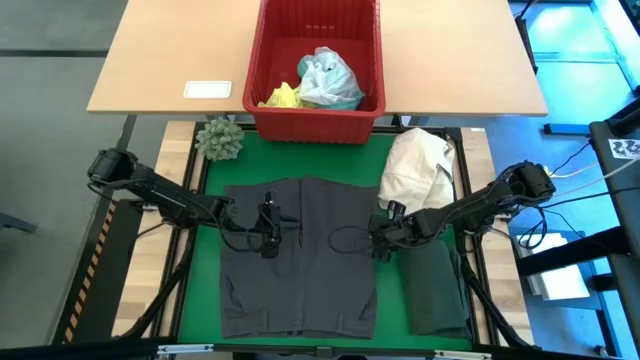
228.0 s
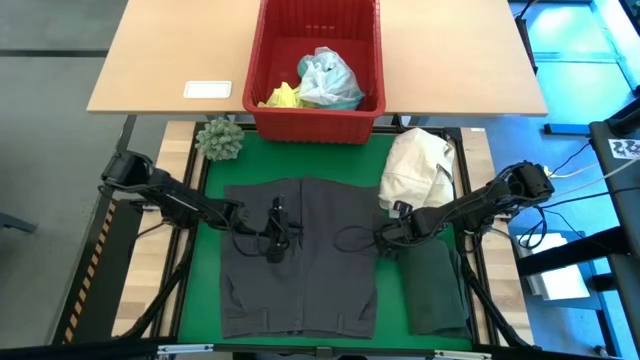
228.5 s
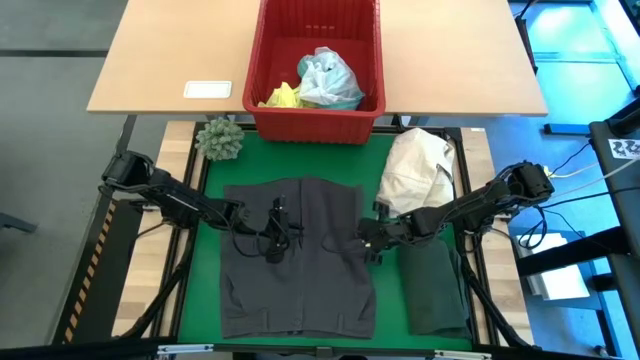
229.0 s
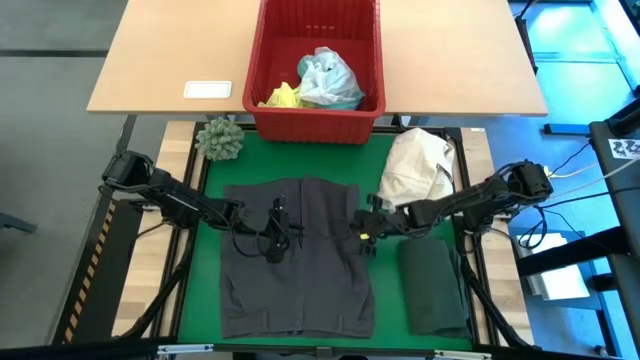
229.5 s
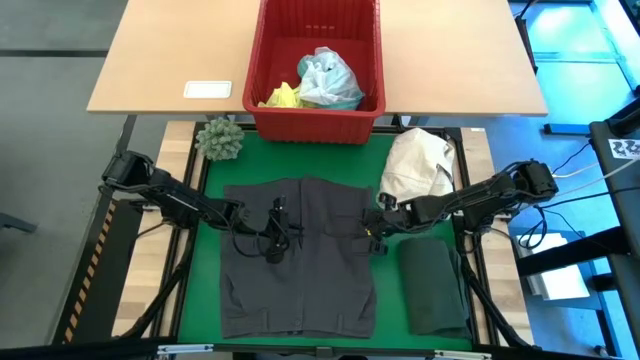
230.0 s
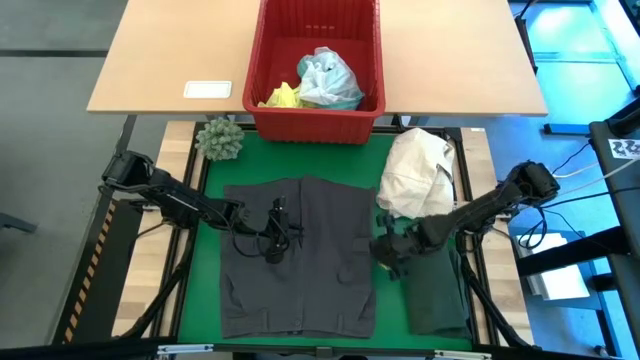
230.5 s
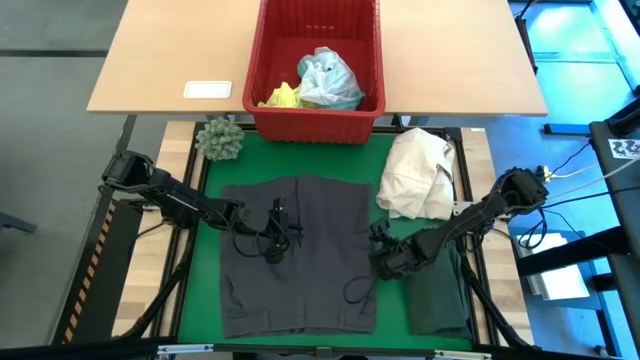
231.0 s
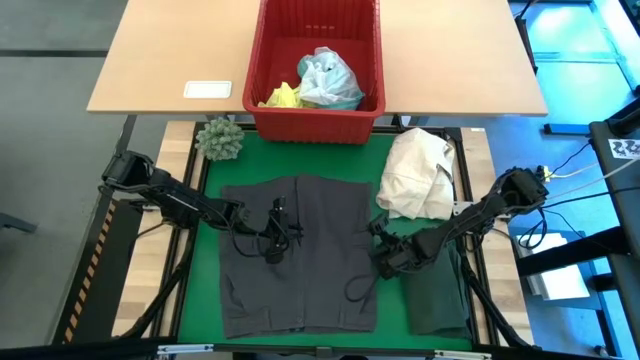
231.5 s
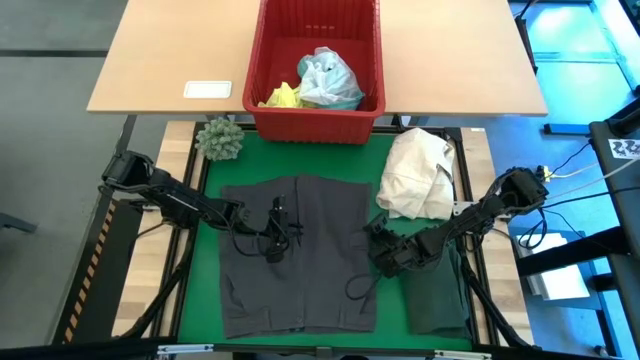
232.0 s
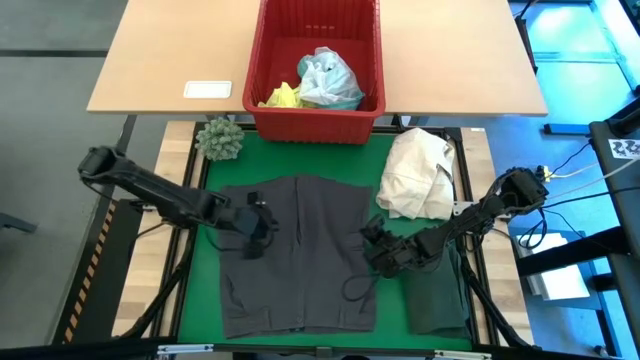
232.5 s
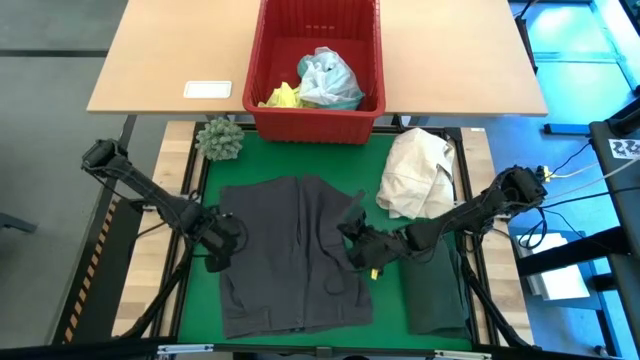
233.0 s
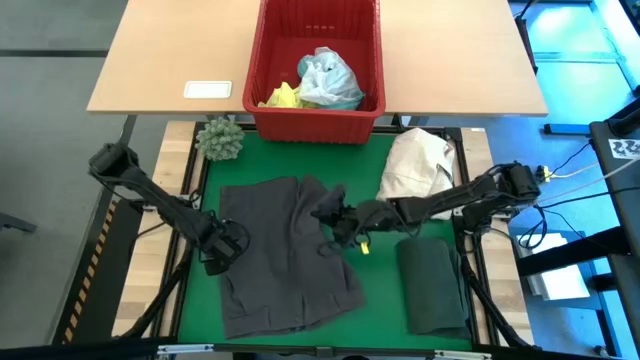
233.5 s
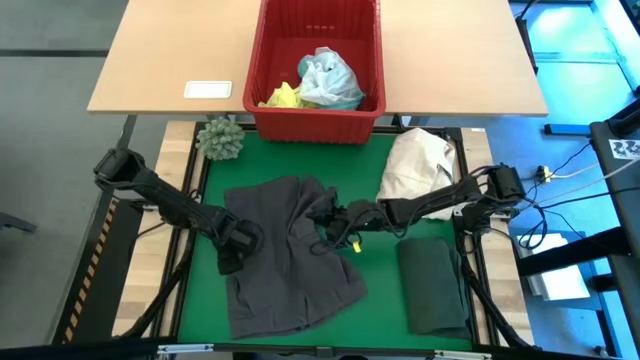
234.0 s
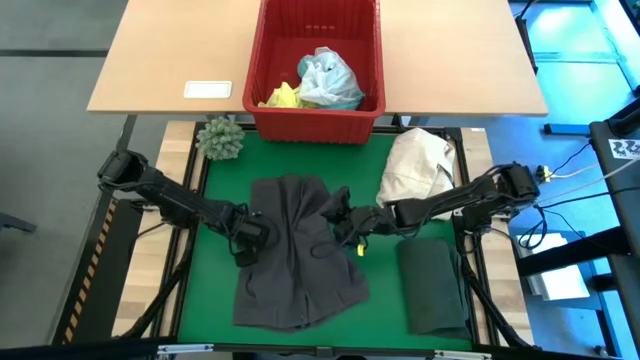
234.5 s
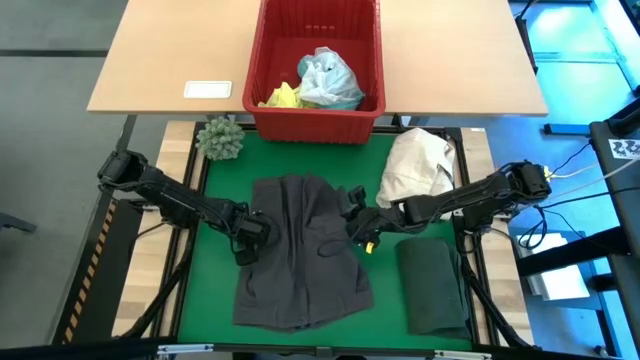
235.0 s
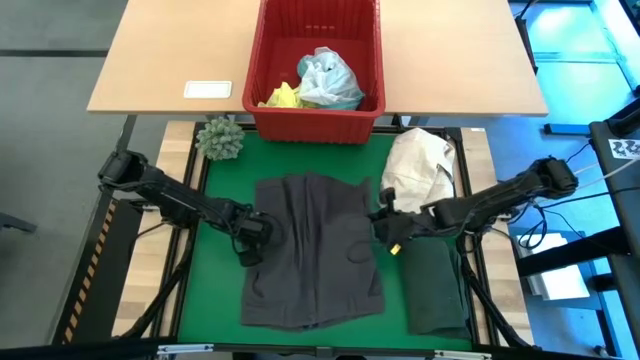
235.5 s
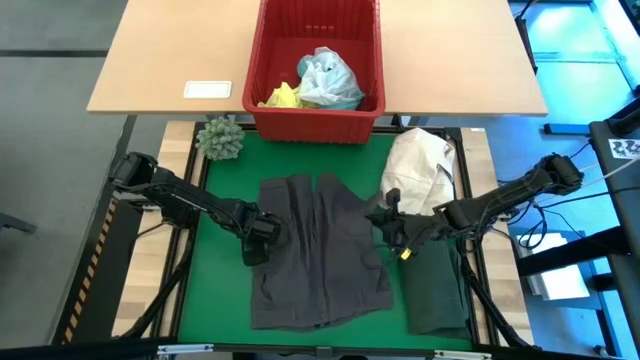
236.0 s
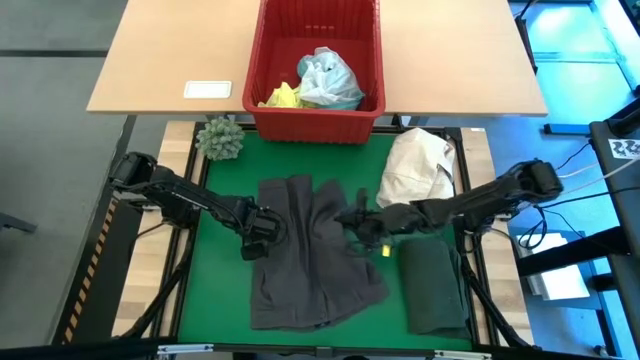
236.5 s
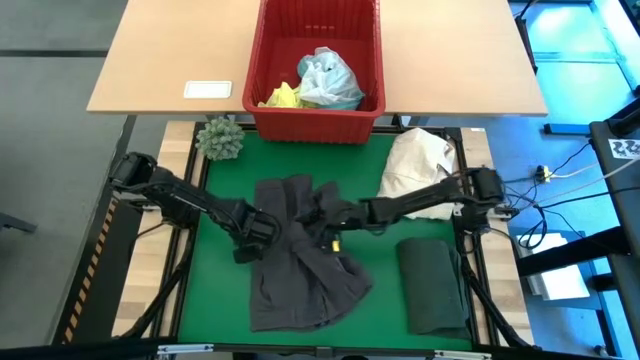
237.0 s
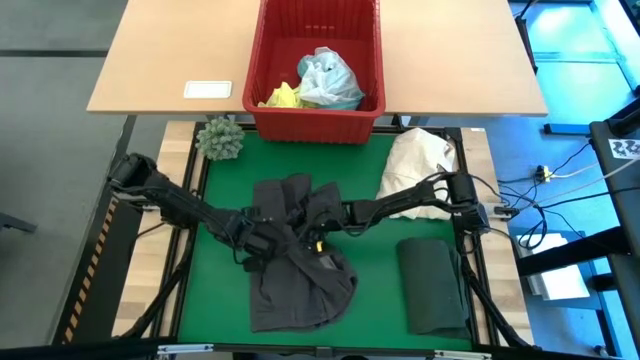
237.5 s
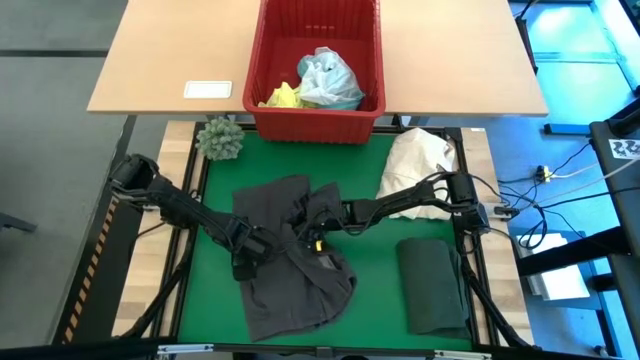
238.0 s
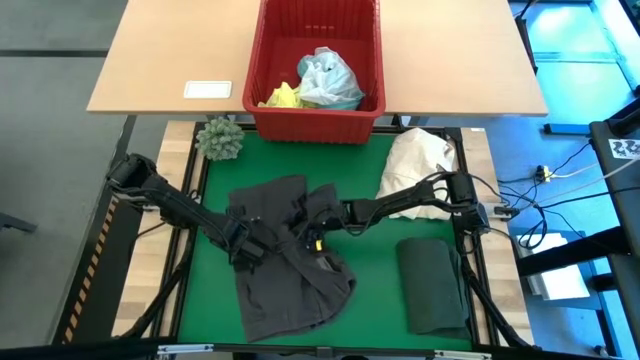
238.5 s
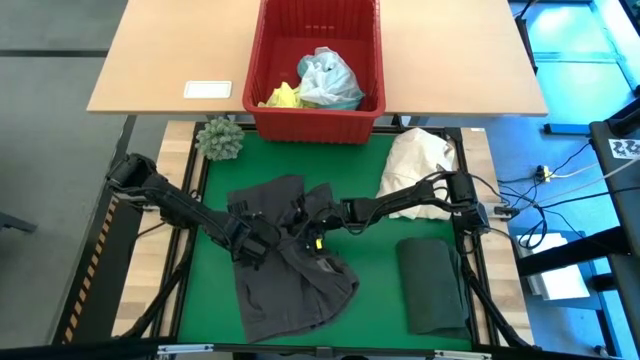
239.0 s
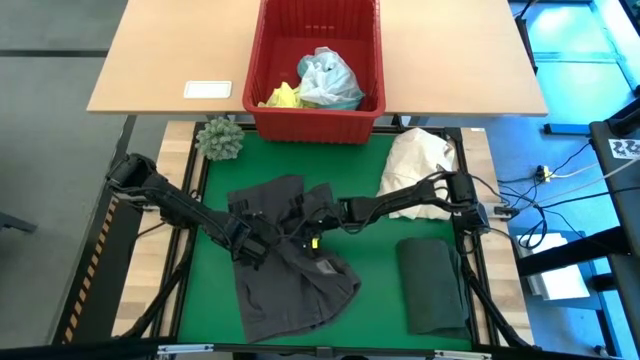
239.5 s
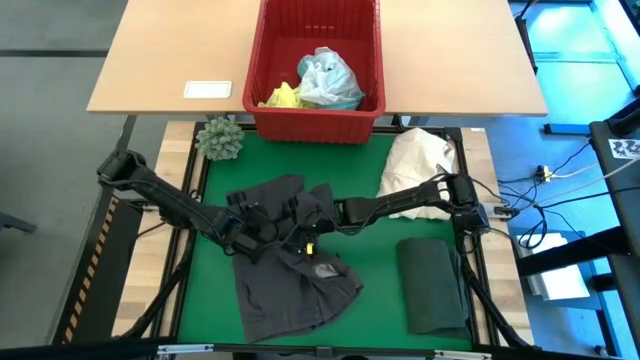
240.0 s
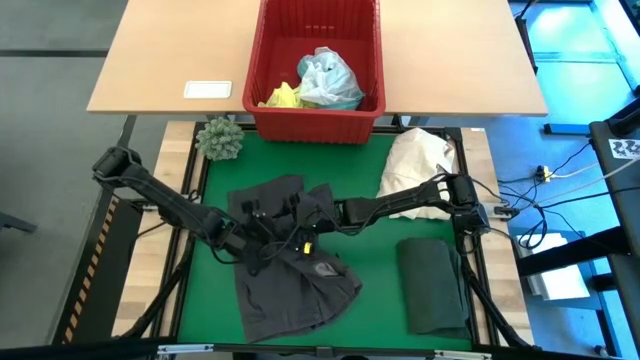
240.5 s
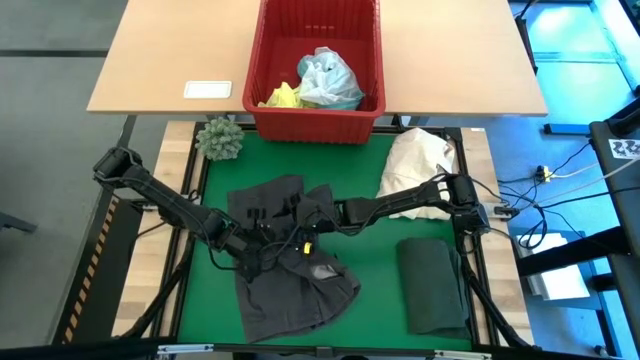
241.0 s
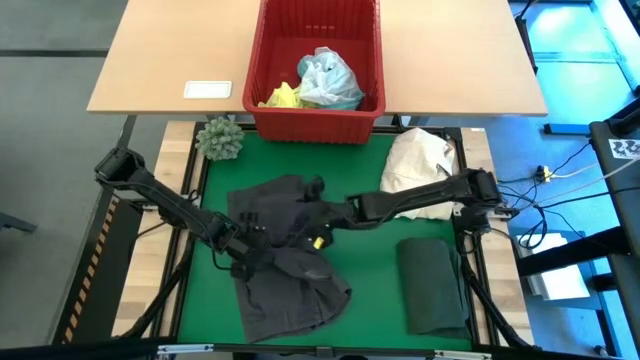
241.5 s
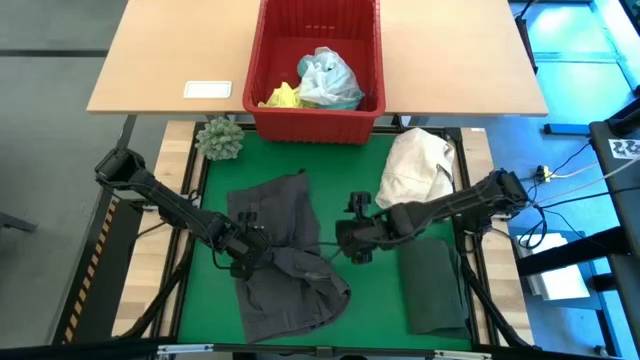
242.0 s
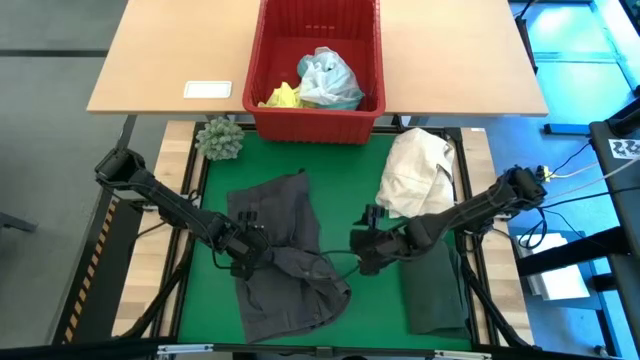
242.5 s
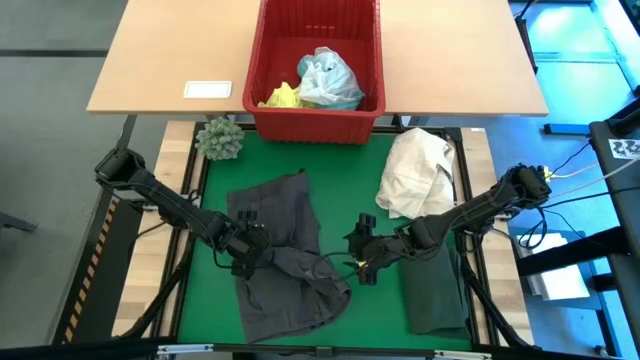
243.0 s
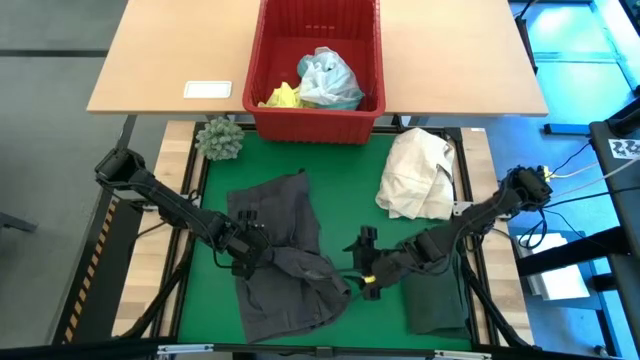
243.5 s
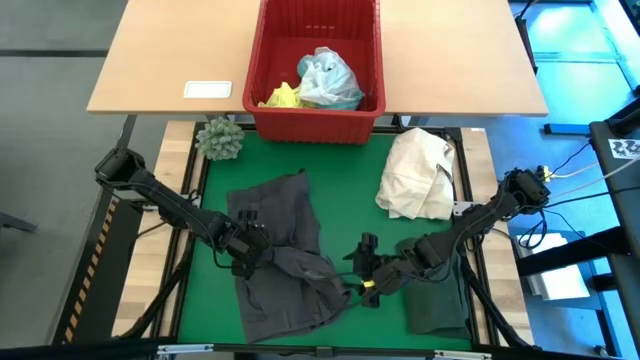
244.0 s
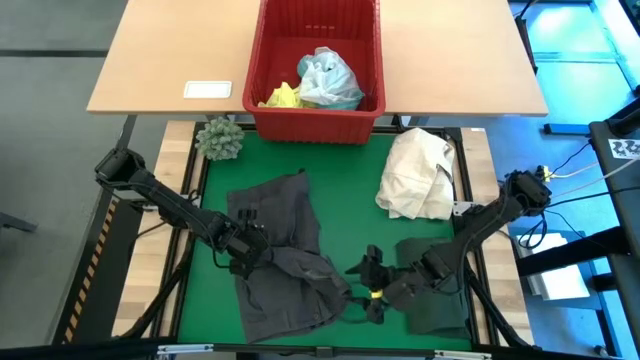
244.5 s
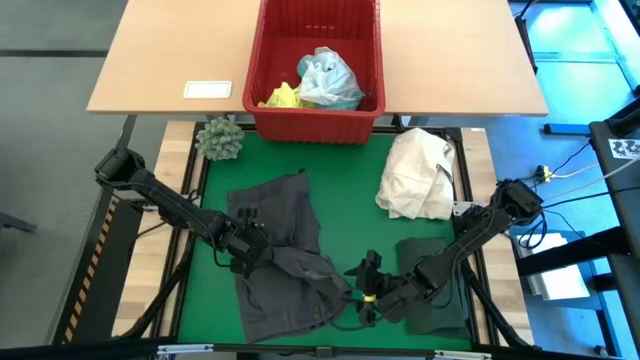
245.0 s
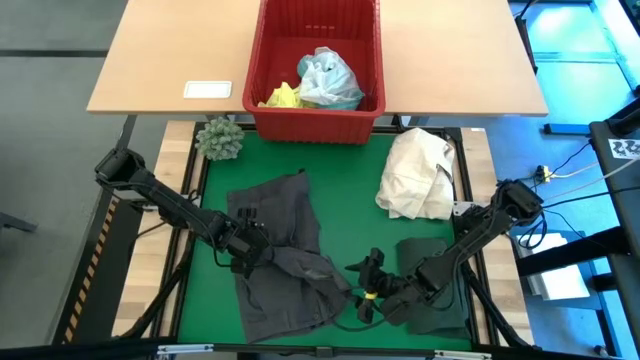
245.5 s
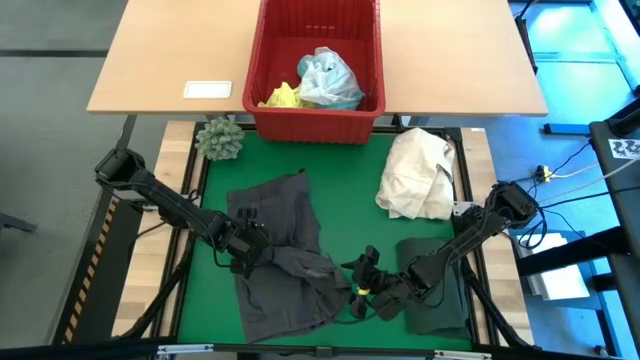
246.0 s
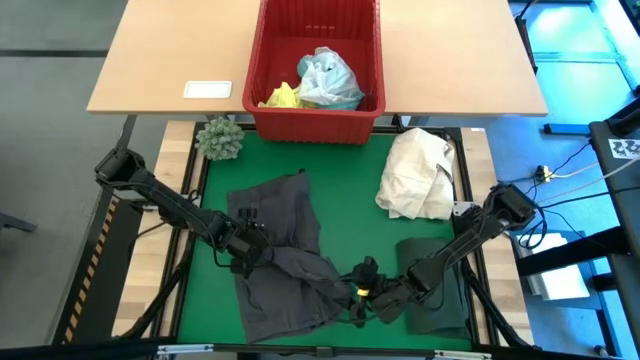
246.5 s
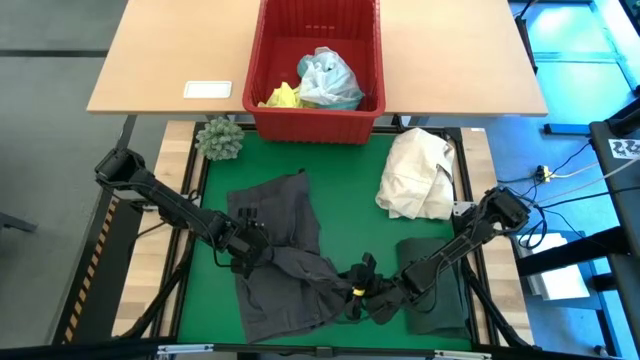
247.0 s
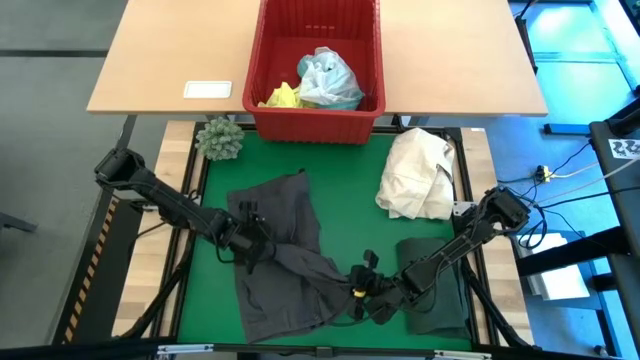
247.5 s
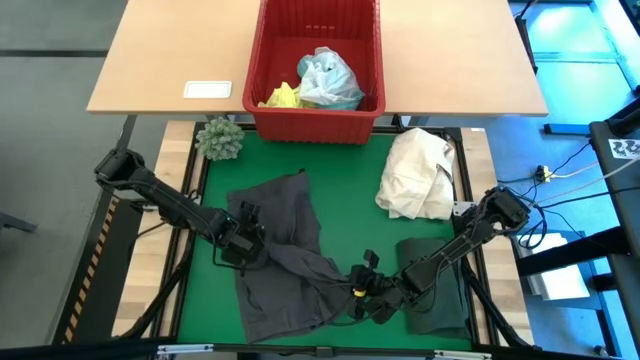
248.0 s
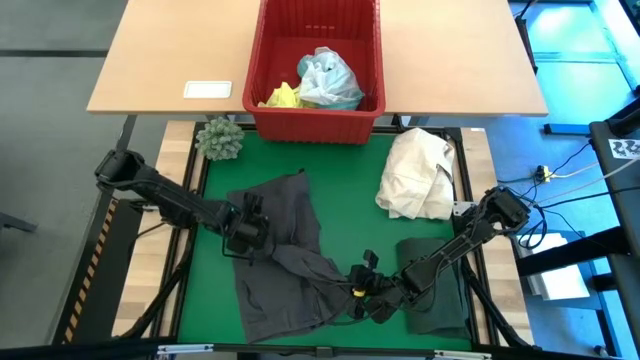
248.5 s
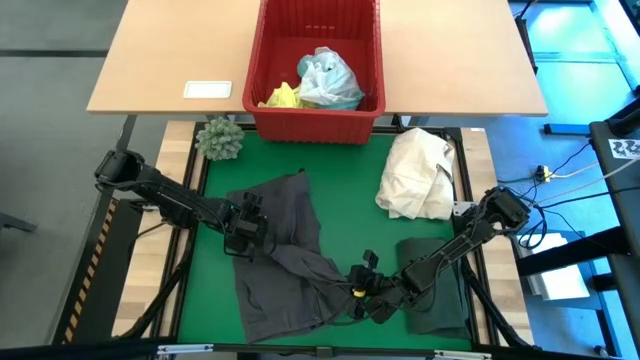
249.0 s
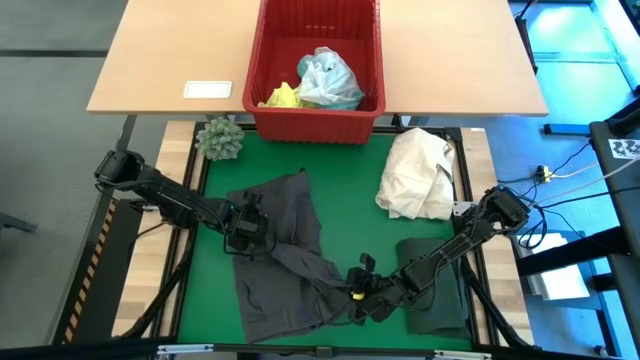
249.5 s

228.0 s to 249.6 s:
Task: Fold Laundry from Bin
Fold the gray short
